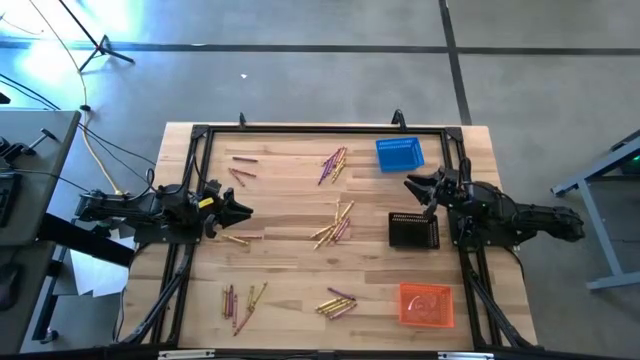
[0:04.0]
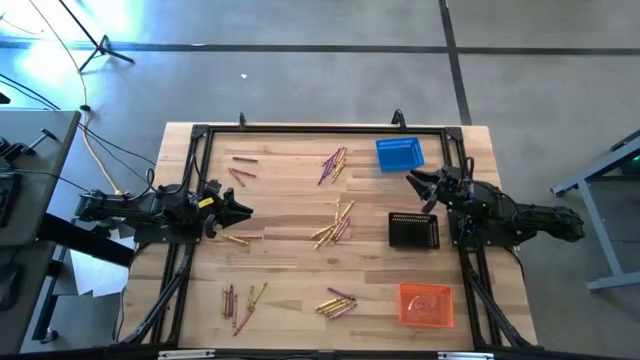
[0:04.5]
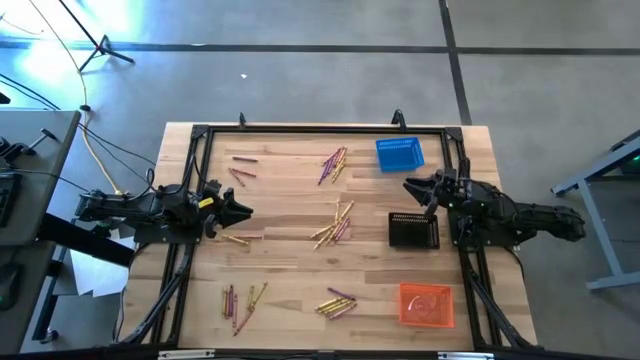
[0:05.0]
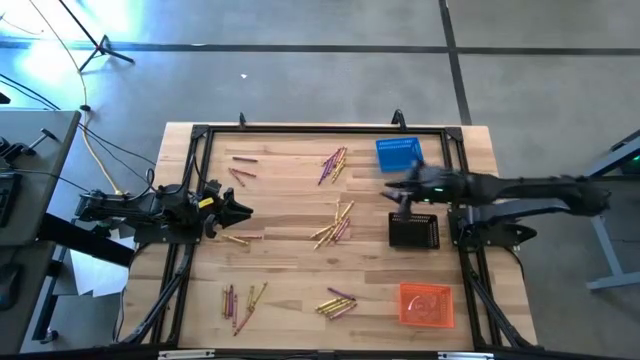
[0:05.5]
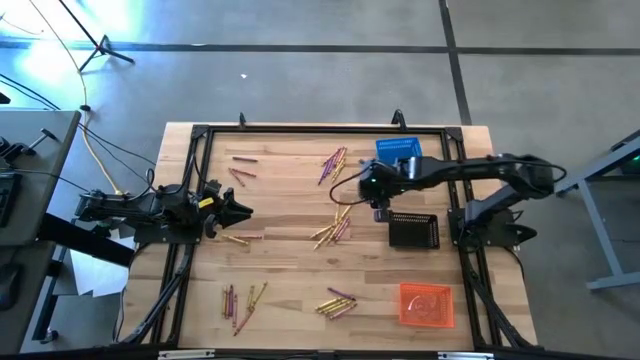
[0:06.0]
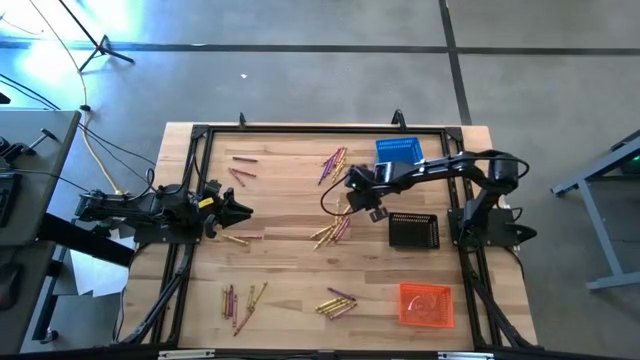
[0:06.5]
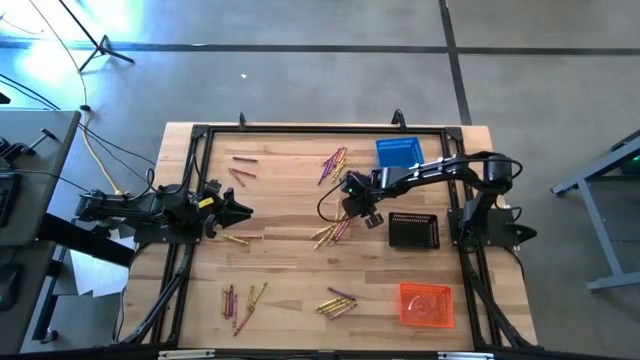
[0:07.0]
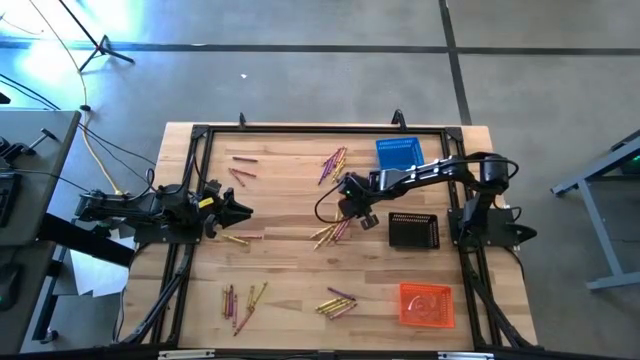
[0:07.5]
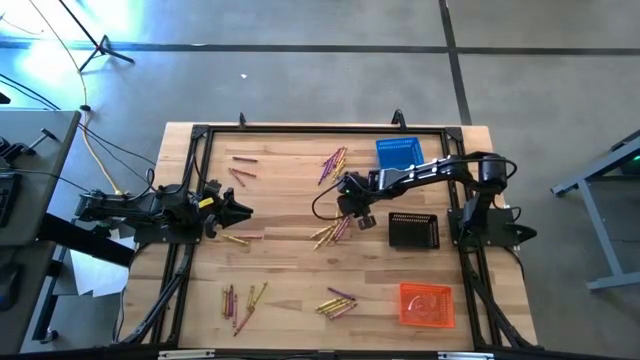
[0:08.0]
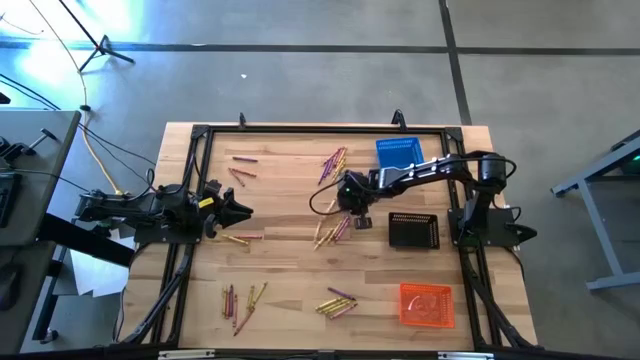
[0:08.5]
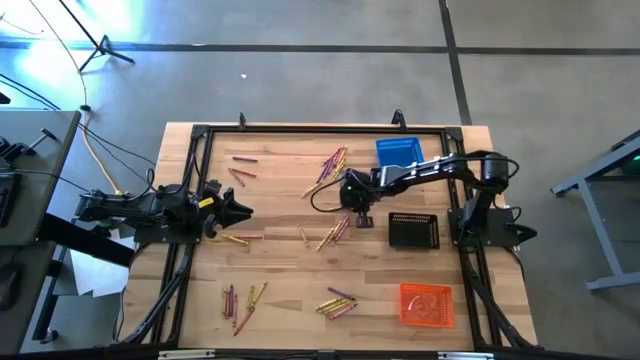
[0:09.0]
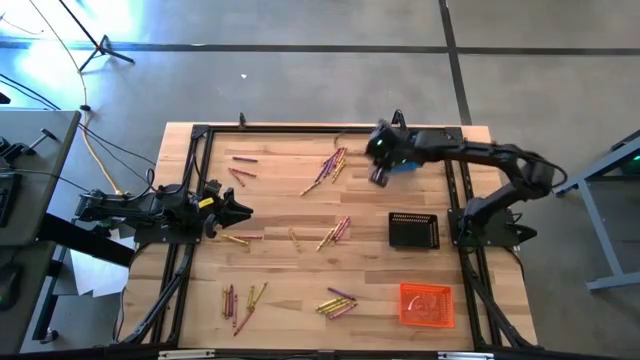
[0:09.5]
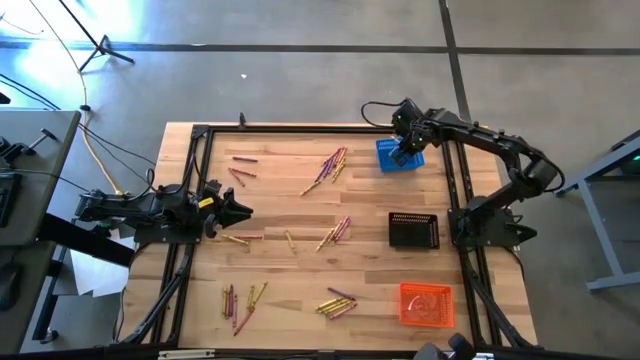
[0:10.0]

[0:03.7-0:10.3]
Task: Sort crayons
Put the yellow crayon into the blue bin

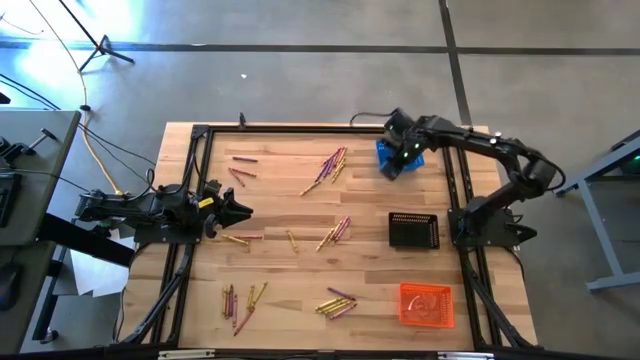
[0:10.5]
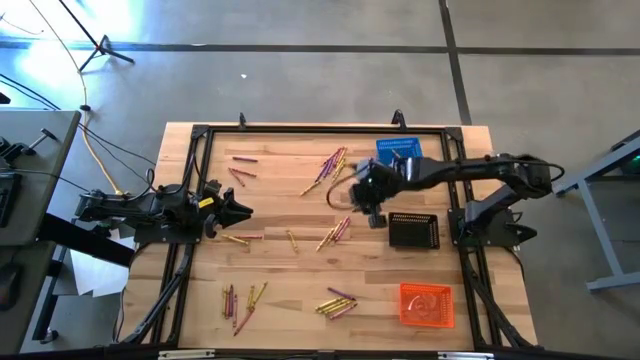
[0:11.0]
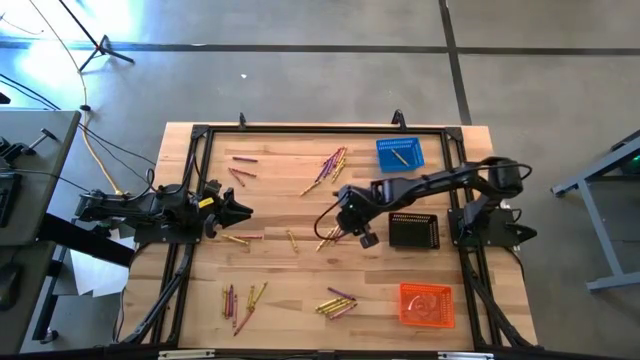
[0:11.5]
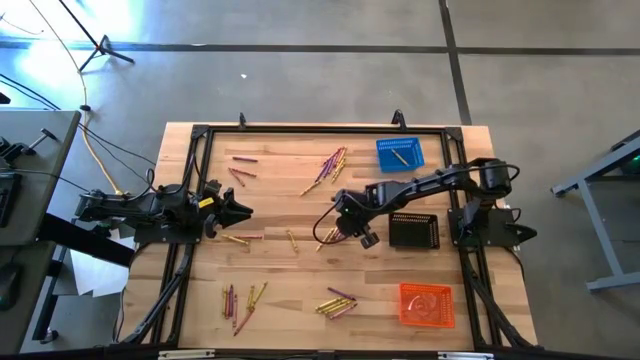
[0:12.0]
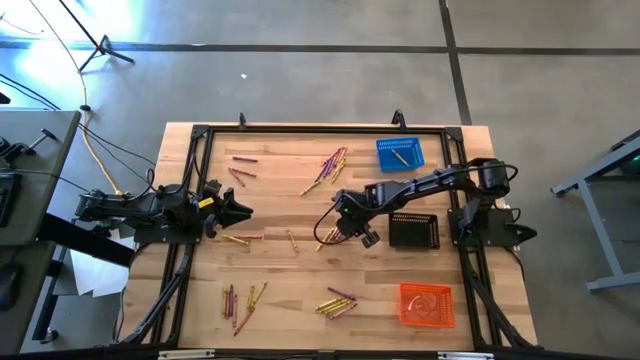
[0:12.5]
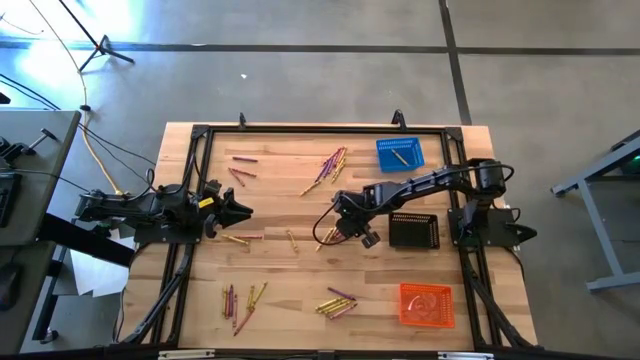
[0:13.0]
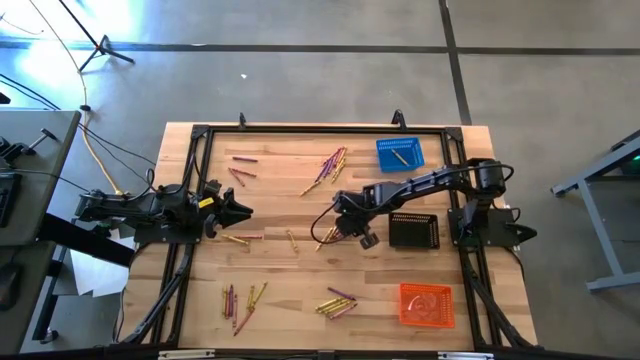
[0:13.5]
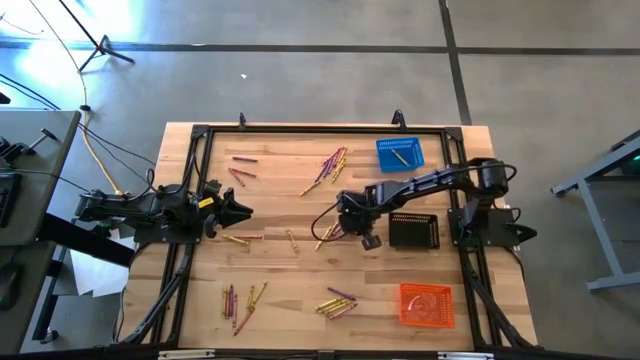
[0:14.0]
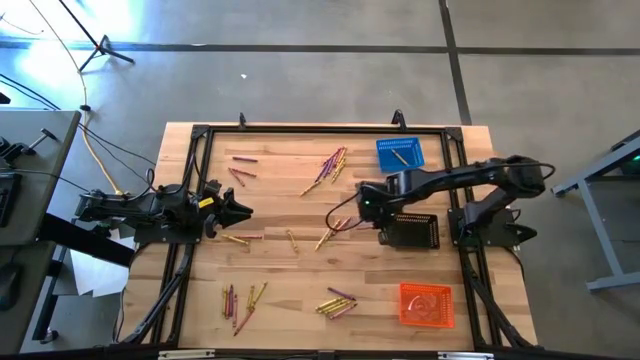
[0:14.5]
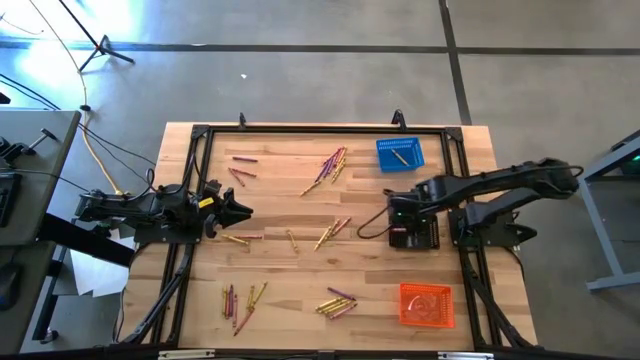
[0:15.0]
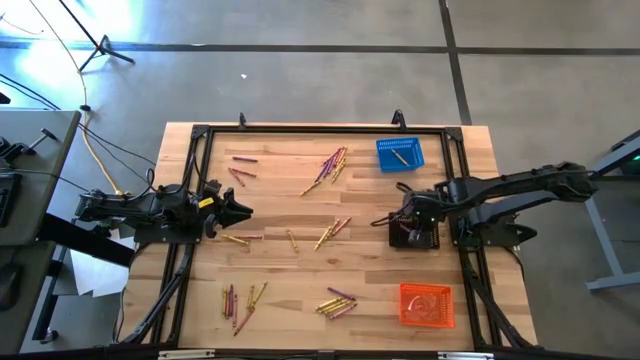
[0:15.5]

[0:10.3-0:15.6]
Put the red crayon into the blue bin

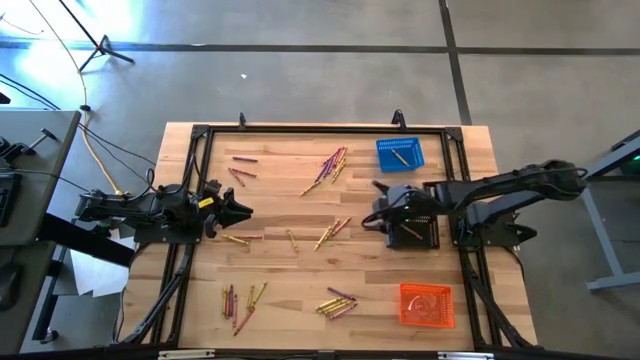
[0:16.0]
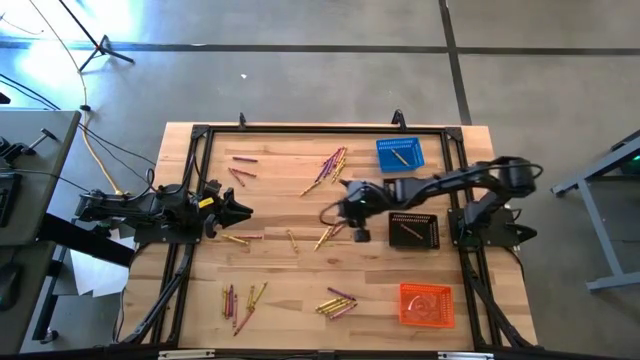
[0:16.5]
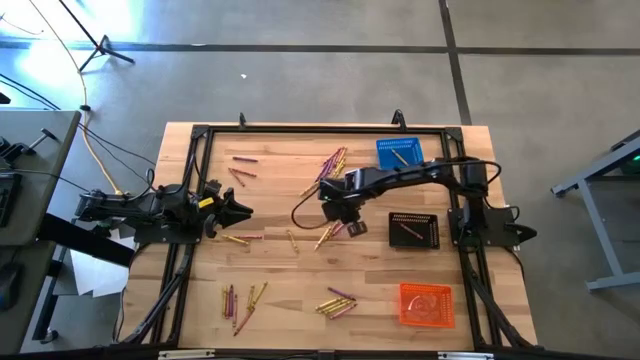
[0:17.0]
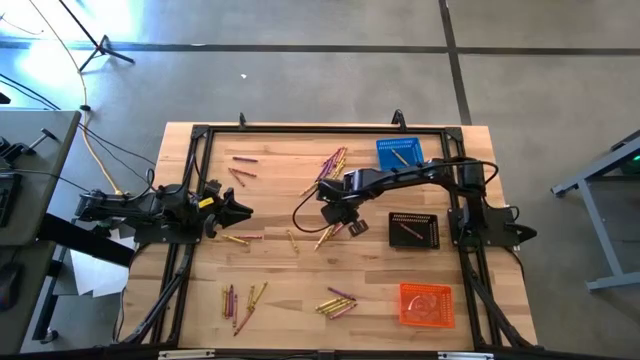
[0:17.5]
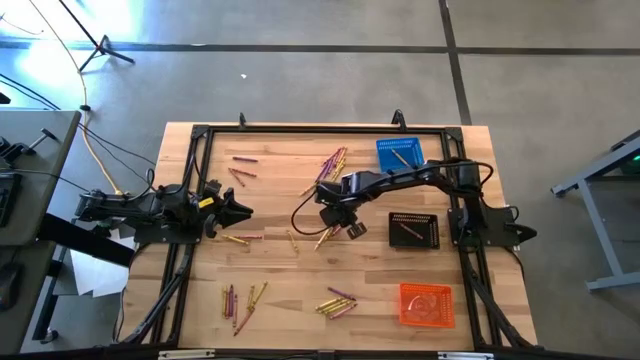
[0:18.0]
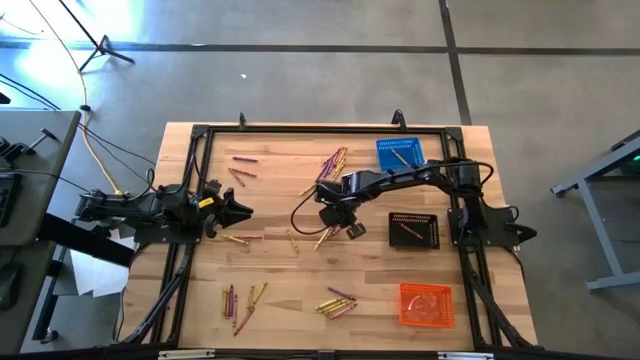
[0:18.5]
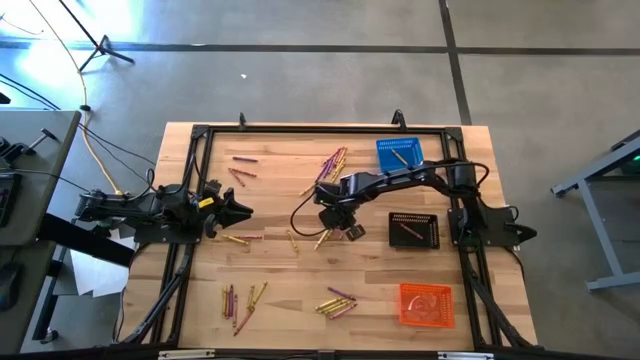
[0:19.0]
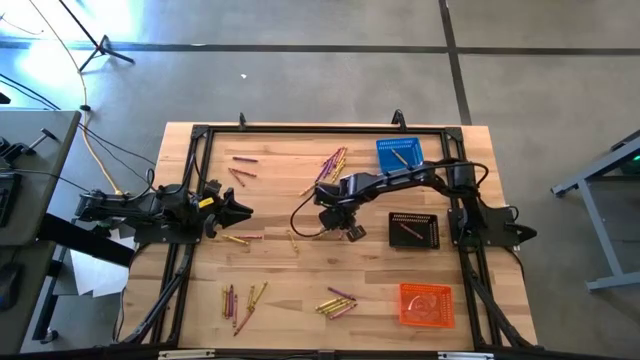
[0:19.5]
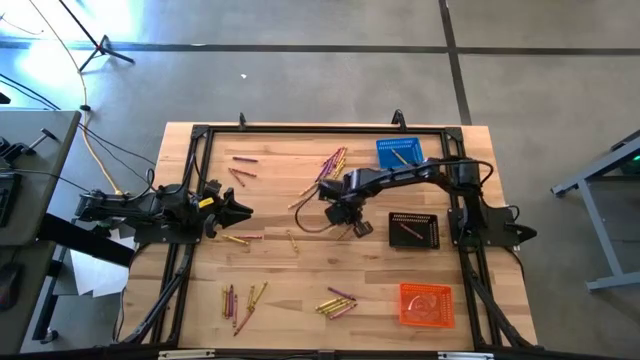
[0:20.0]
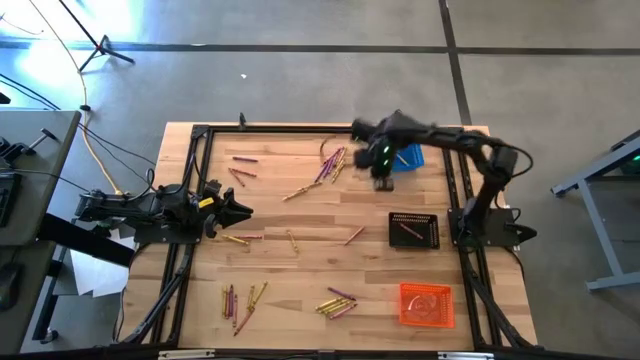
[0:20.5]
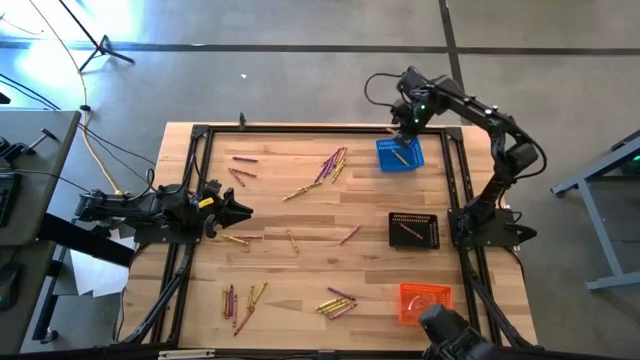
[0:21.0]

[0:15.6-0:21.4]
Put the yellow crayon into the blue bin

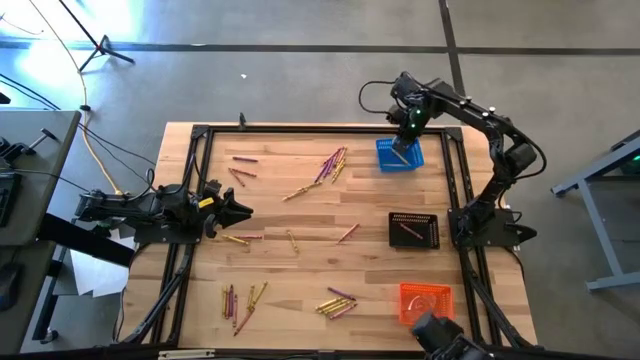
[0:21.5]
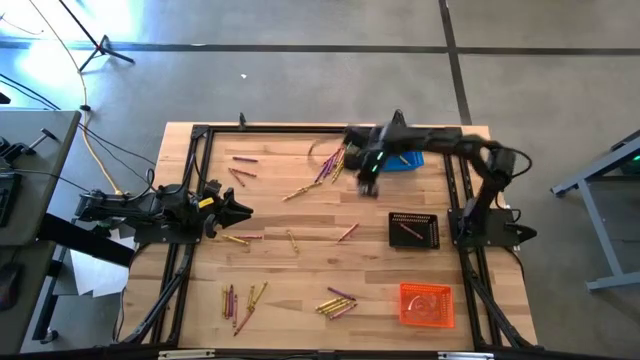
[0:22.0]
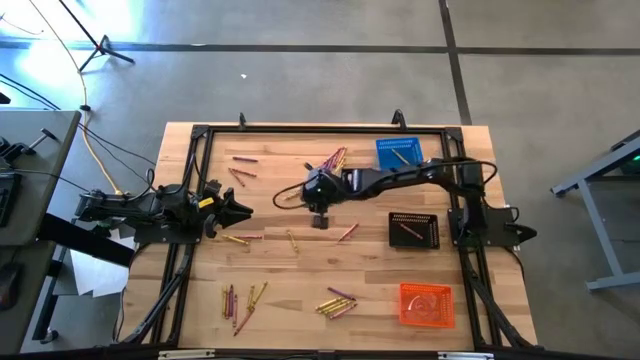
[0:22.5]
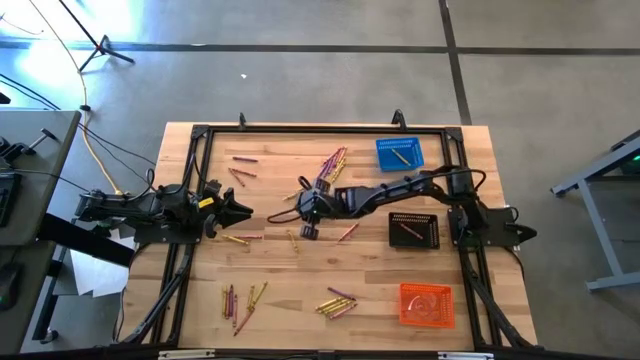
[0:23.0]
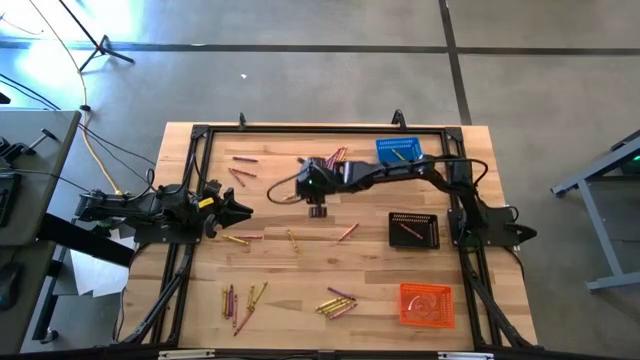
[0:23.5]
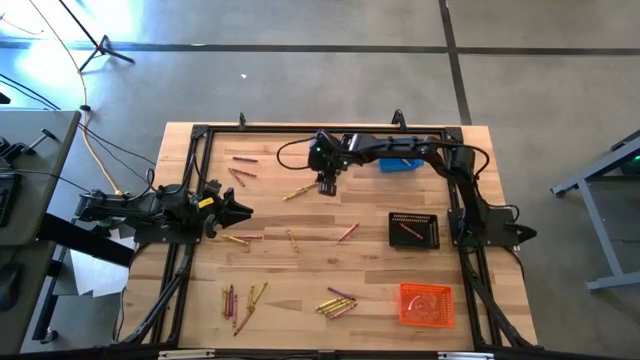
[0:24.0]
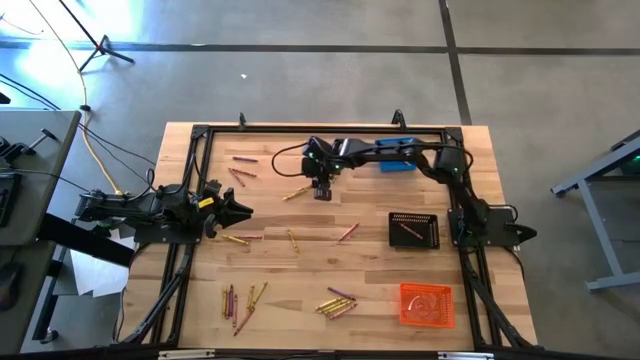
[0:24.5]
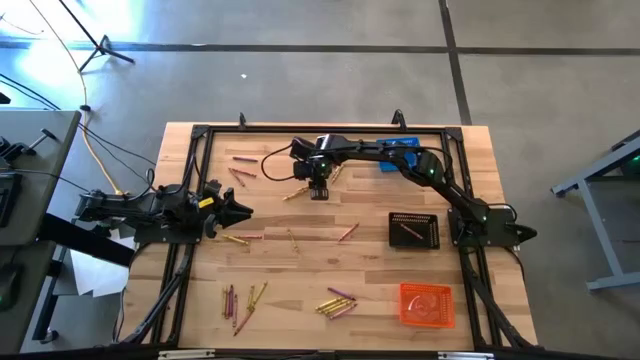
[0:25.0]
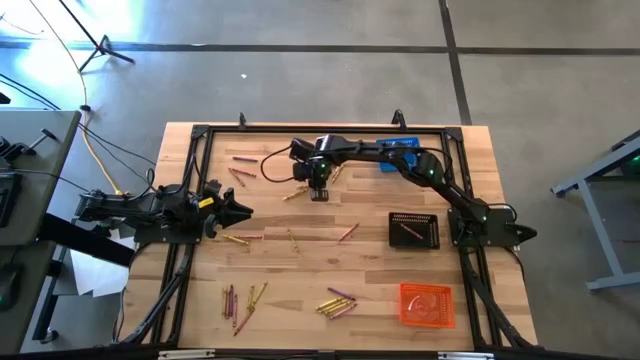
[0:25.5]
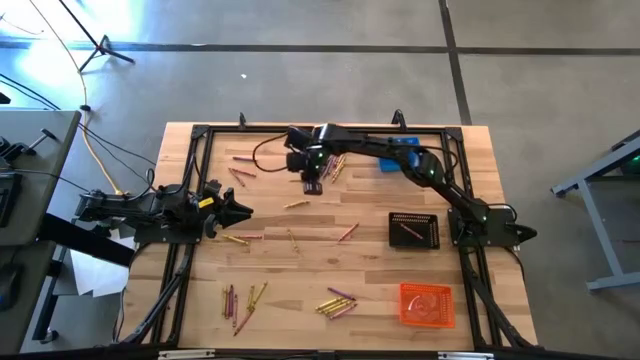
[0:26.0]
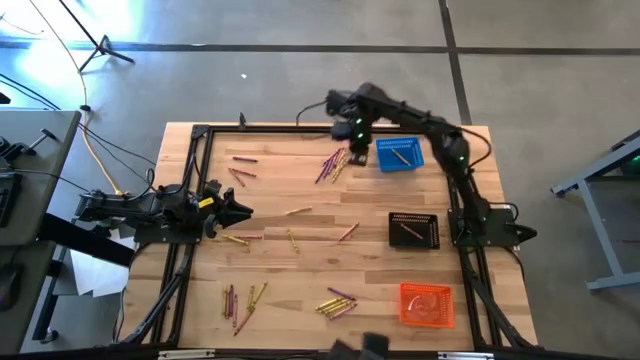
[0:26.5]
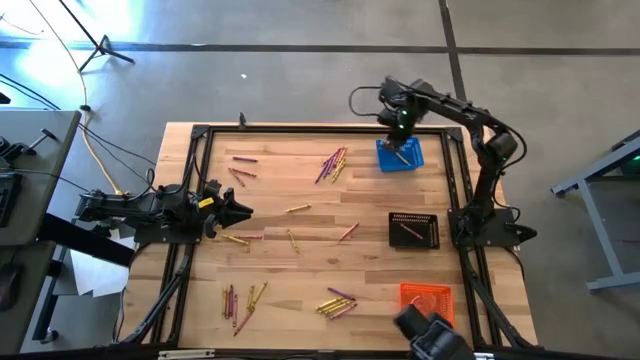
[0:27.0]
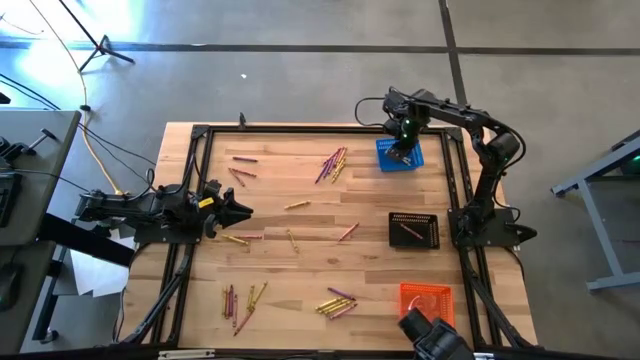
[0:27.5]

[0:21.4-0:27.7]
Put the yellow crayon into the blue bin
